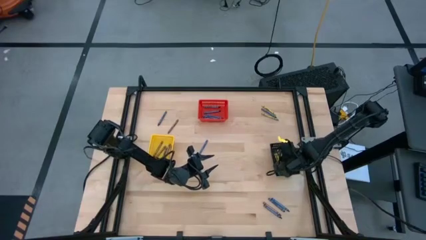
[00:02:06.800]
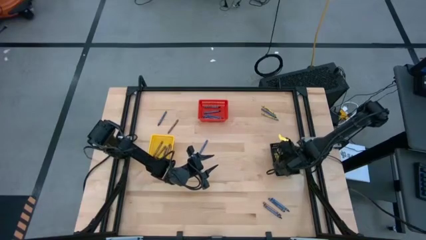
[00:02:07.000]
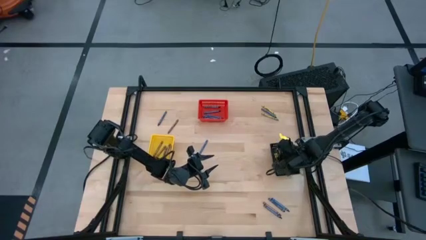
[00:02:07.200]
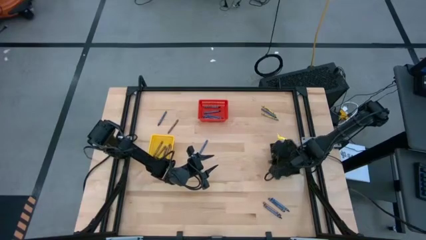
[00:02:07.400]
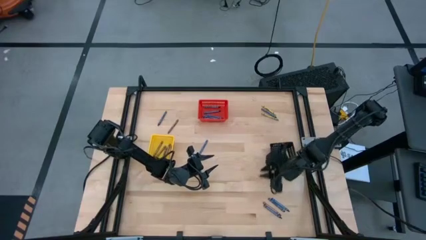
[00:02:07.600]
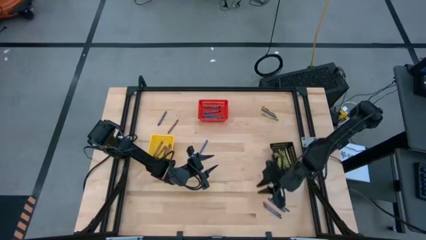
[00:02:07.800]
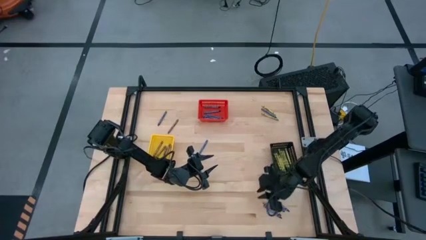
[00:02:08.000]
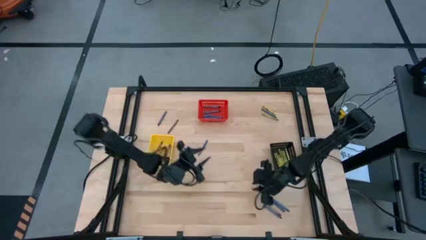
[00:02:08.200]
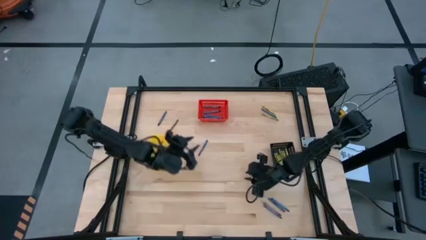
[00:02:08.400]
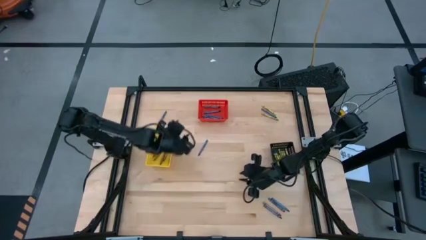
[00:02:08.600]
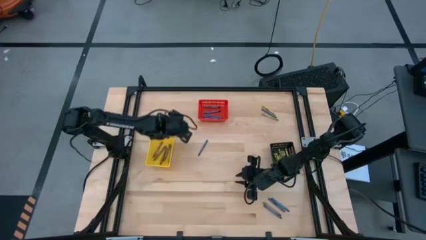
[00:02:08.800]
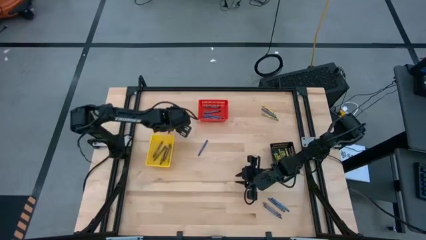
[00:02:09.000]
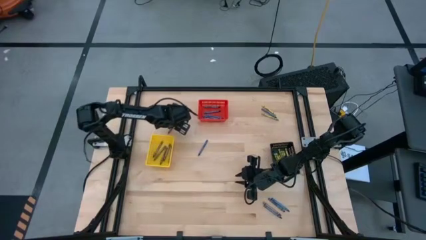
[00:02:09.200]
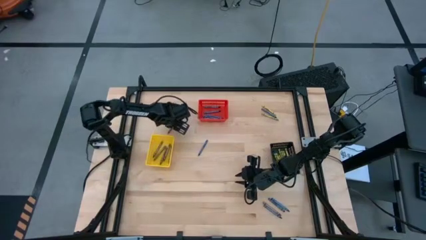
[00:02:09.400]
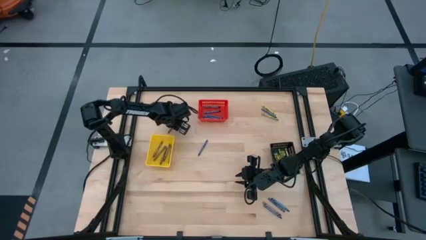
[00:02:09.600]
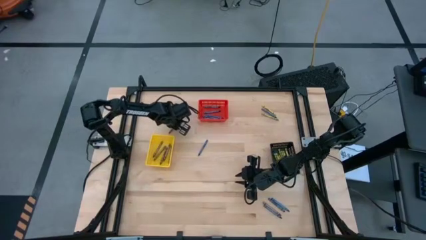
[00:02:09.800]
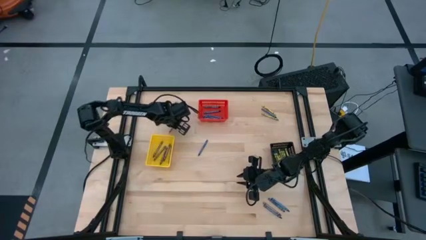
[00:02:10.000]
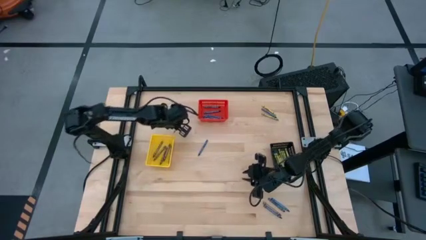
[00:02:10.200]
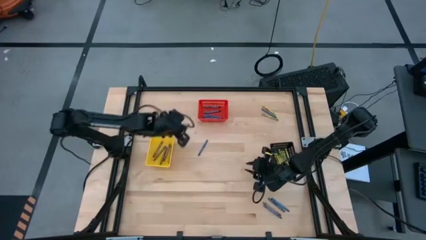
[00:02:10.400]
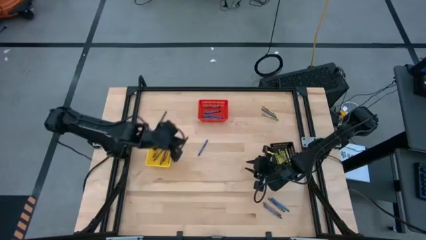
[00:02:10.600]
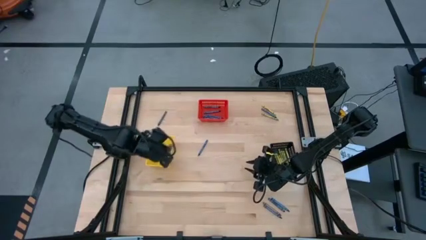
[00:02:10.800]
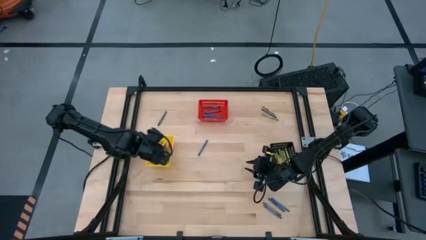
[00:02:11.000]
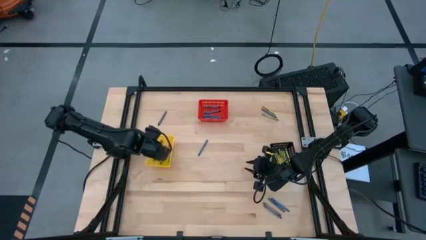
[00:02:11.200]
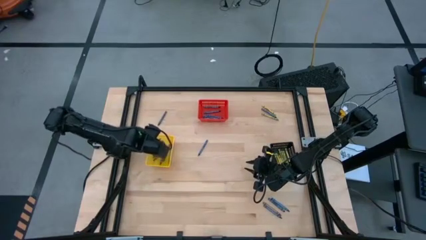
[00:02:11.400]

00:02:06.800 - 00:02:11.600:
Task: Sort crayons
Put the brown crayon into the yellow basket

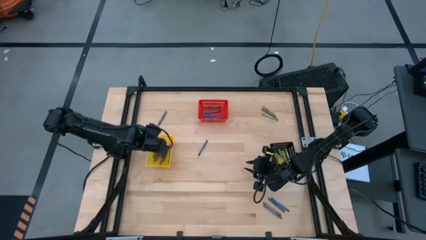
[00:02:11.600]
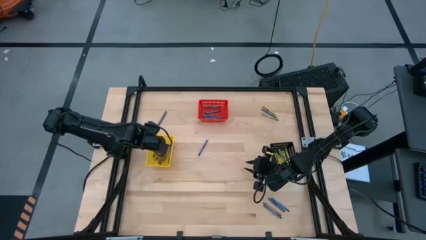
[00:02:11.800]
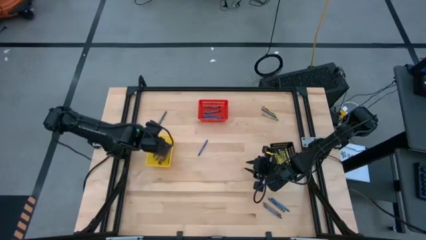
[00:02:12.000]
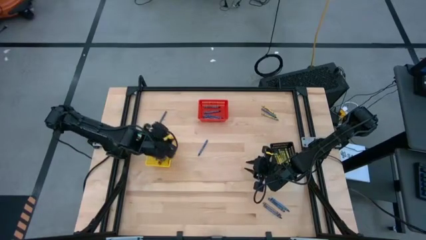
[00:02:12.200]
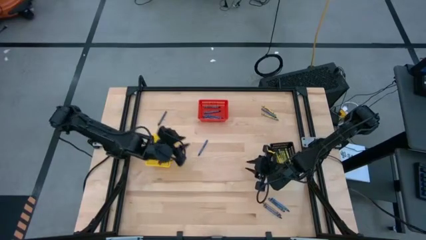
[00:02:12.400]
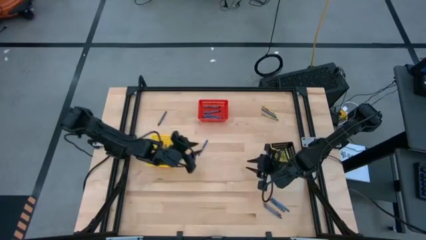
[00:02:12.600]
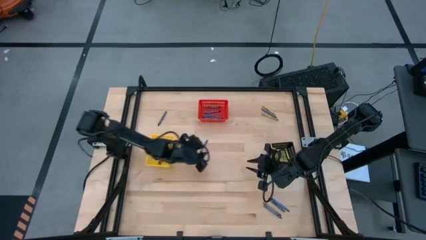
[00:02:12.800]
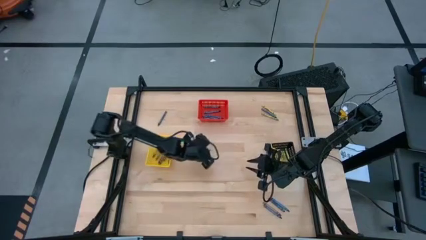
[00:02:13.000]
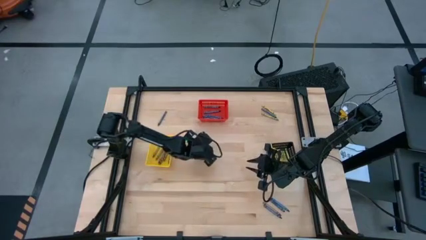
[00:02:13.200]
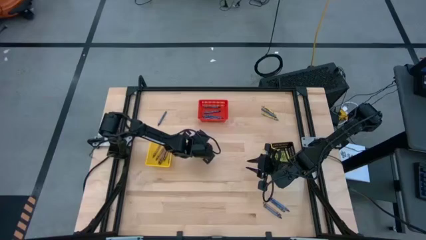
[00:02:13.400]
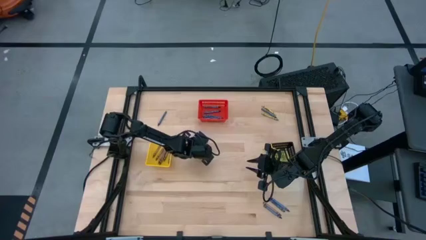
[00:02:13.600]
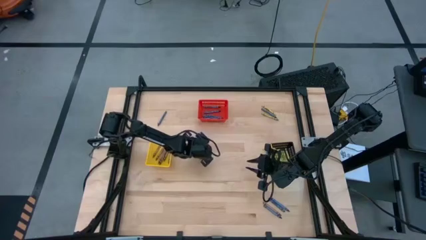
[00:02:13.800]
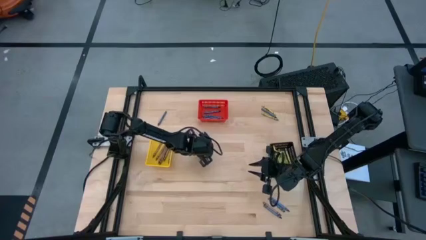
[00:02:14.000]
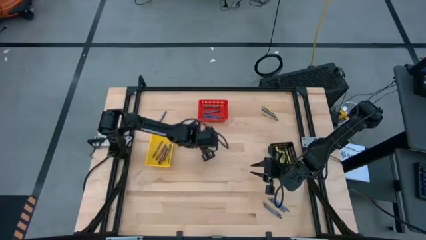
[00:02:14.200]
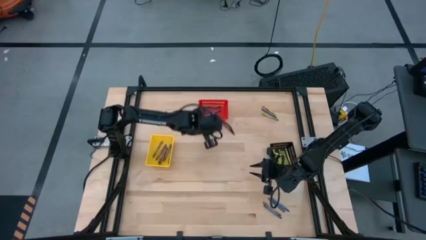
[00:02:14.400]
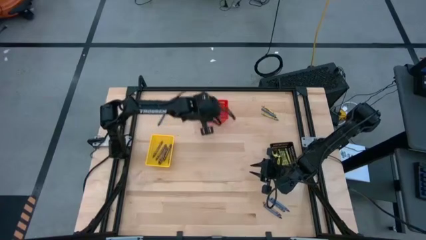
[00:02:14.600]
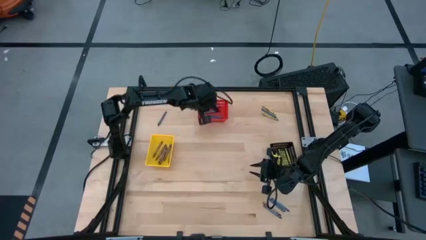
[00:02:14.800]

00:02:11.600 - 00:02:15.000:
Put the blue crayon into the red basket

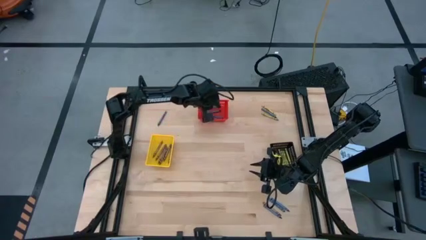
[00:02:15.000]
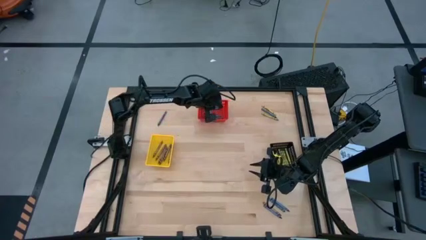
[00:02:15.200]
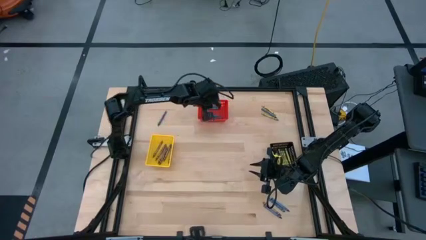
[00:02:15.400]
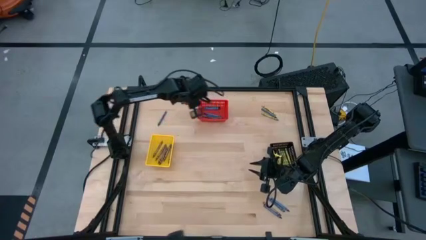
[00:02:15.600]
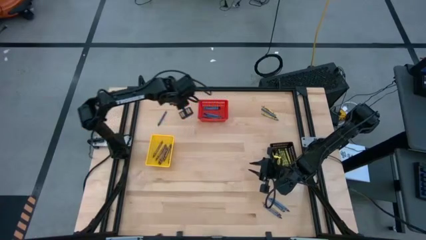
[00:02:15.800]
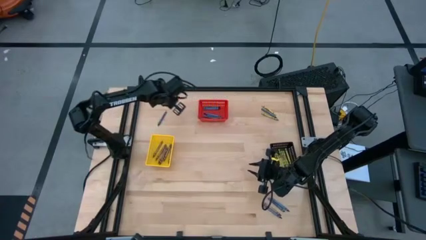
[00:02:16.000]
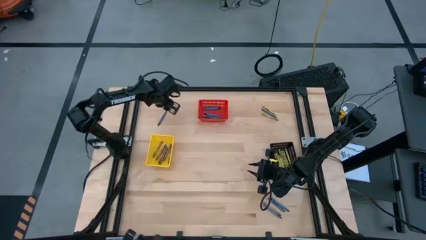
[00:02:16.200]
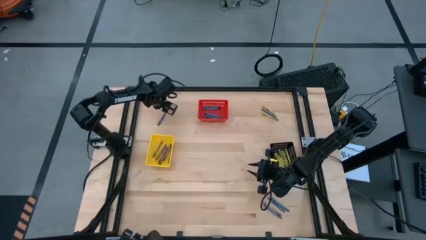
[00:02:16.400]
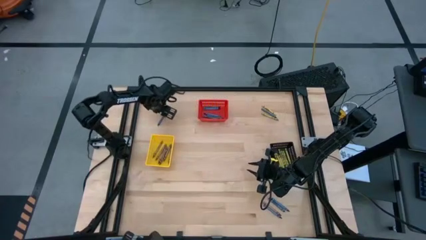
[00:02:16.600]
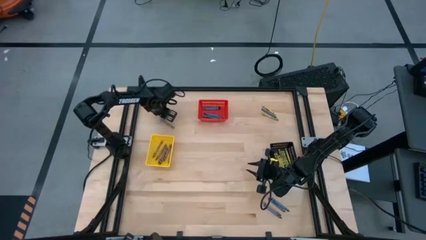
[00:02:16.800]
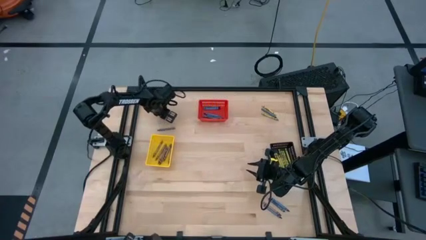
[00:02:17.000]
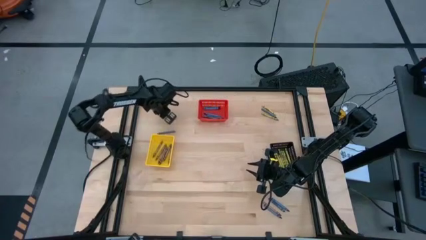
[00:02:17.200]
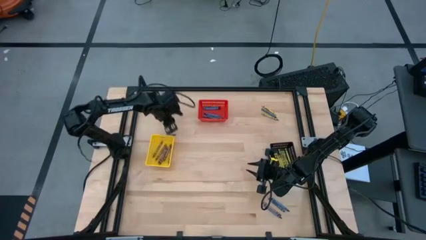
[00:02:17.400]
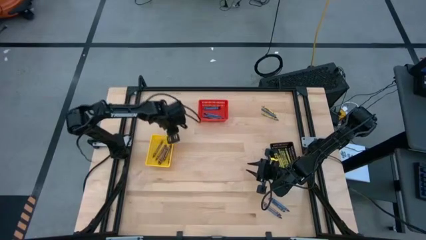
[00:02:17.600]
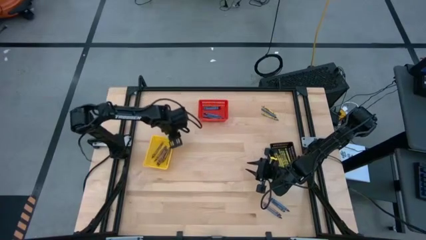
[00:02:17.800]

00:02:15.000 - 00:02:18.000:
Put the blue crayon into the red basket

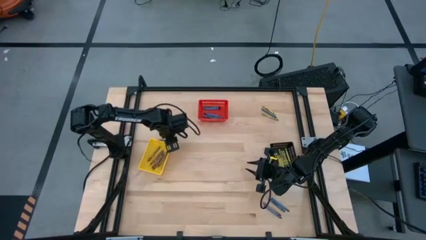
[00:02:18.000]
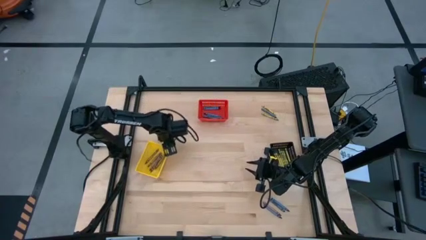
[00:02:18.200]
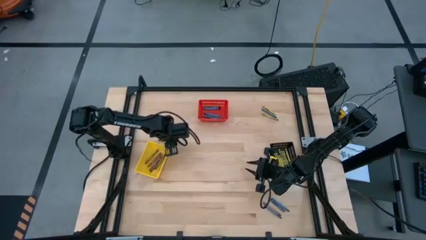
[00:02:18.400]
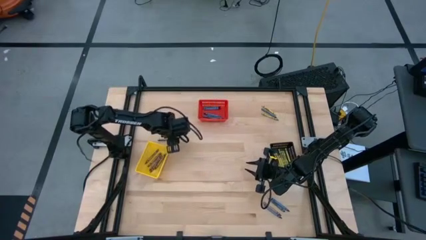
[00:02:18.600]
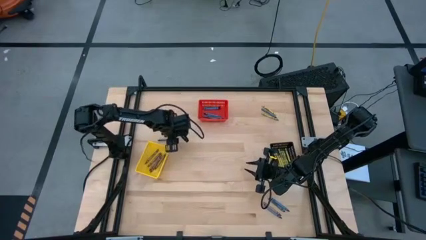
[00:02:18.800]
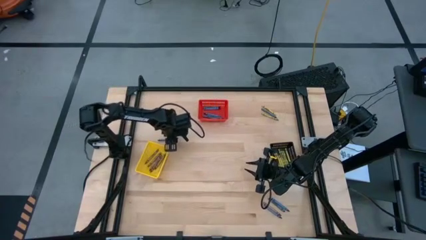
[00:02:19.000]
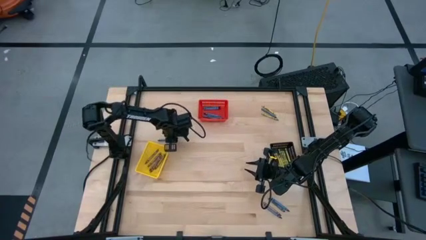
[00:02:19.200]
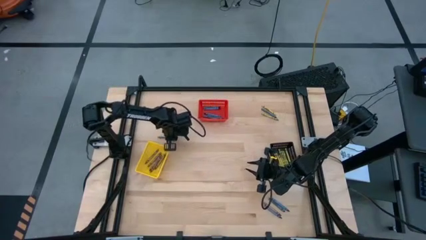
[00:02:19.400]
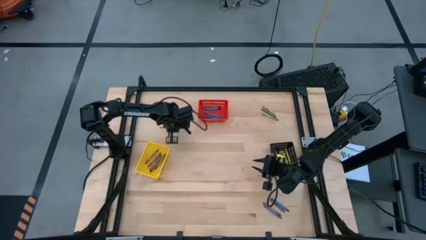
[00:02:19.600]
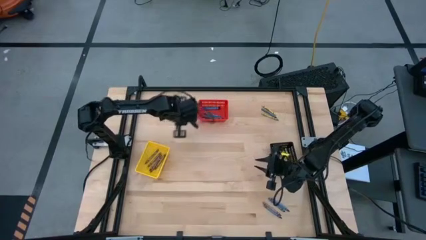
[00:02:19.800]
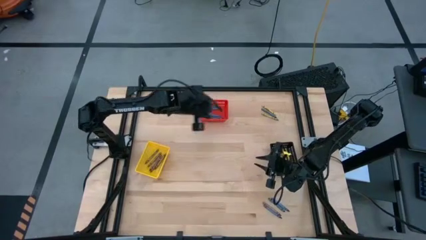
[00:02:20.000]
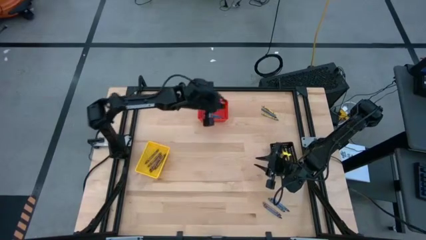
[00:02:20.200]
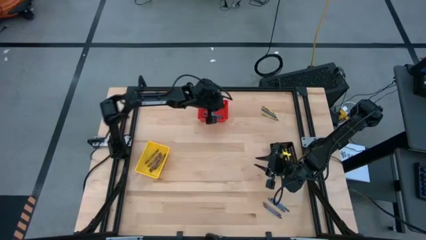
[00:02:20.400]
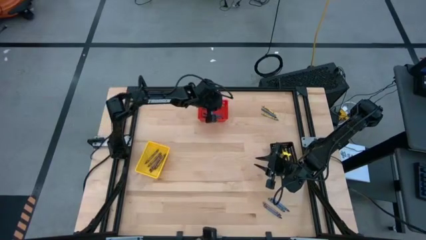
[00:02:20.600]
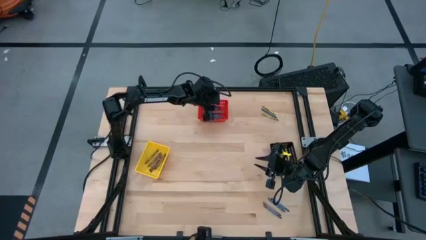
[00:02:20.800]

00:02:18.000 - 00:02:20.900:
Put the blue crayon into the red basket

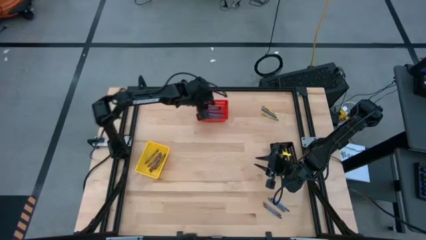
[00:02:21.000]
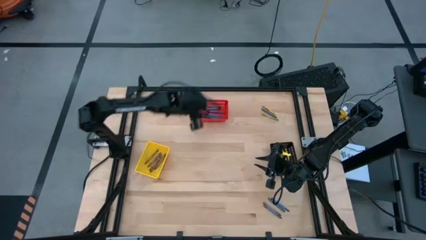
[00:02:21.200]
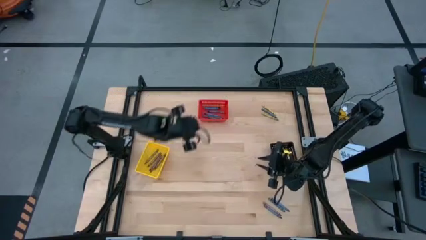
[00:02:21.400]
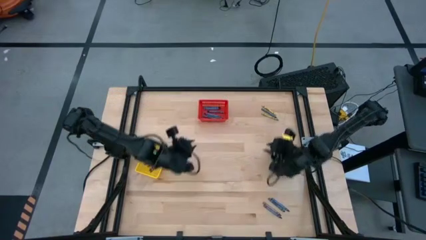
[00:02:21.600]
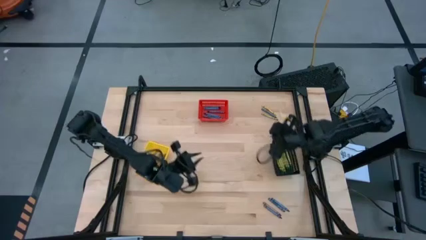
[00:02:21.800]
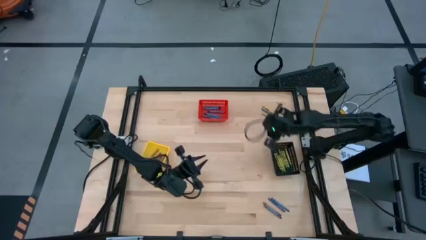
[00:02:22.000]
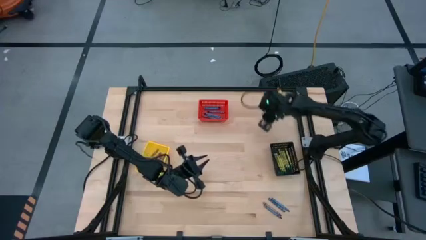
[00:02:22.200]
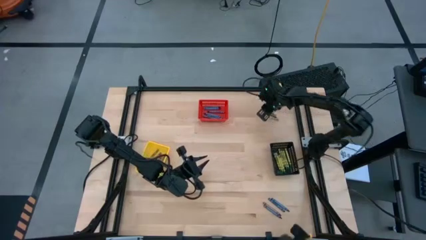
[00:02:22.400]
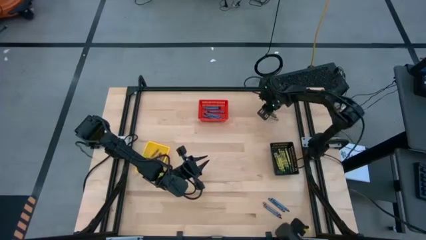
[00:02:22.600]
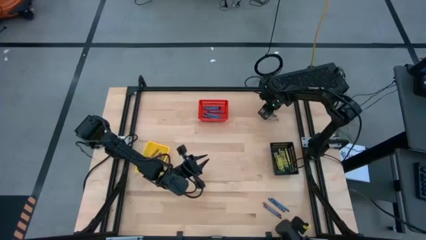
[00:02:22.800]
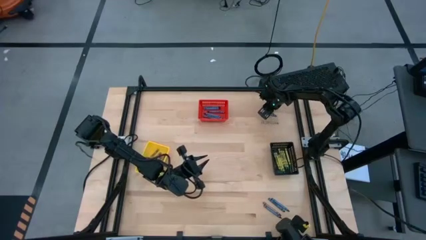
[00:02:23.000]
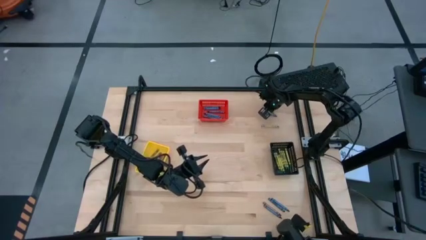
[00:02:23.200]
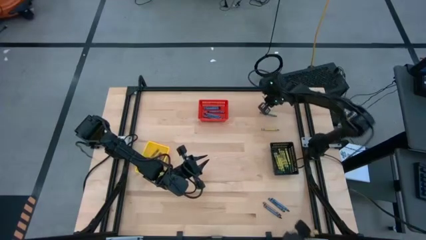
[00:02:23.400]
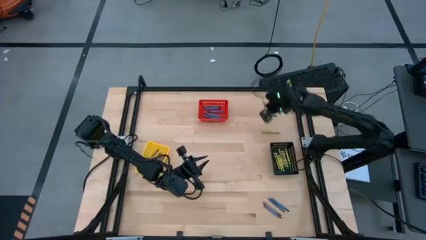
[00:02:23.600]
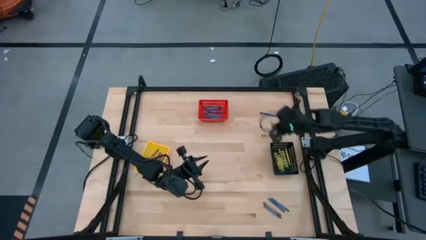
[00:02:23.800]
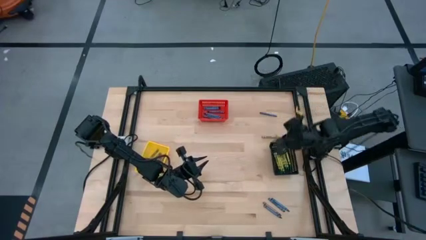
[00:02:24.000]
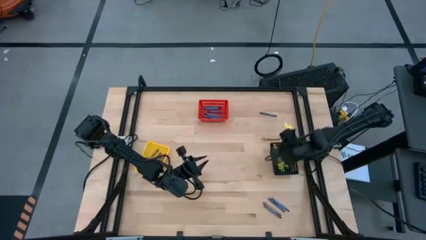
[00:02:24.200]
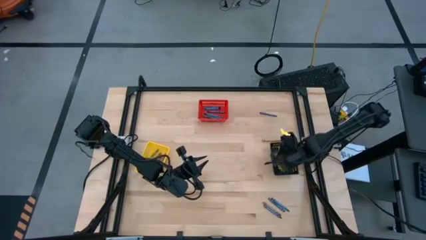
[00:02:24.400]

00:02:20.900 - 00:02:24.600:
Put the green crayon into the black basket
